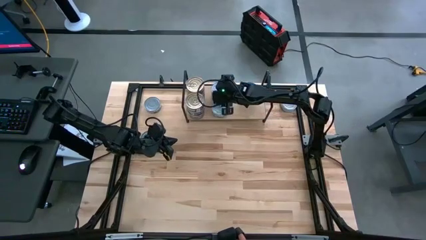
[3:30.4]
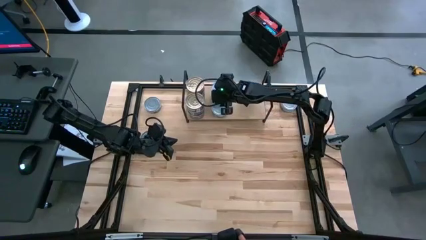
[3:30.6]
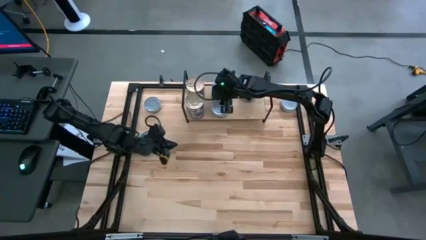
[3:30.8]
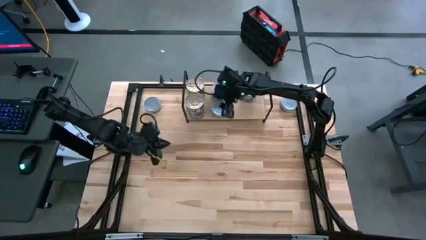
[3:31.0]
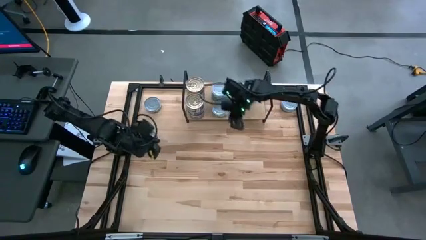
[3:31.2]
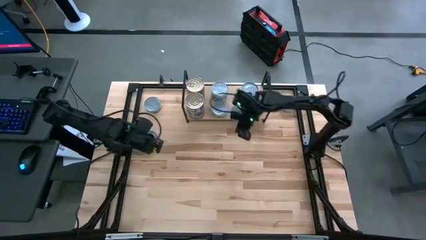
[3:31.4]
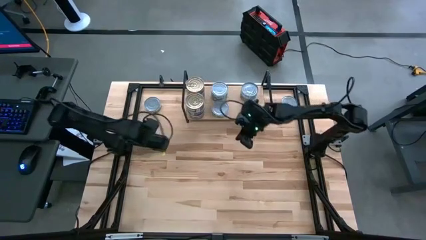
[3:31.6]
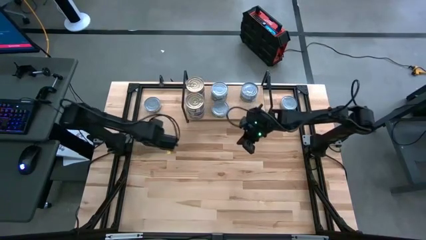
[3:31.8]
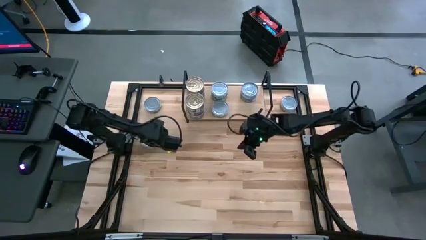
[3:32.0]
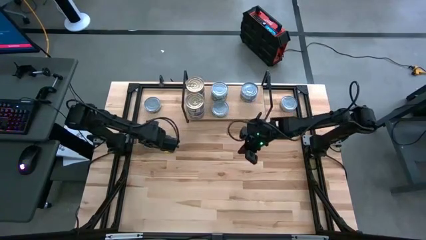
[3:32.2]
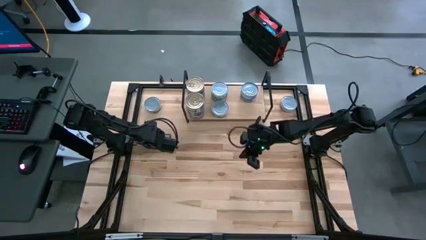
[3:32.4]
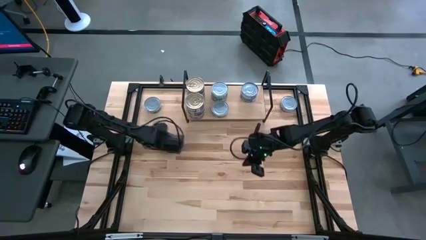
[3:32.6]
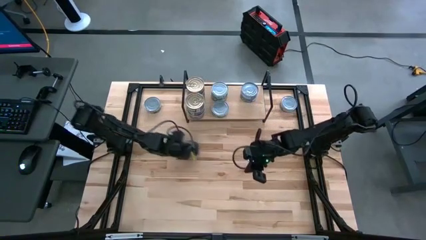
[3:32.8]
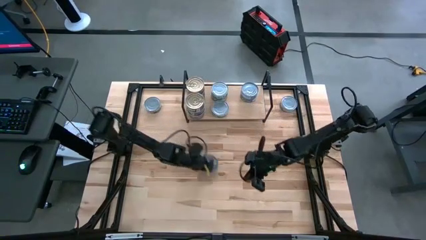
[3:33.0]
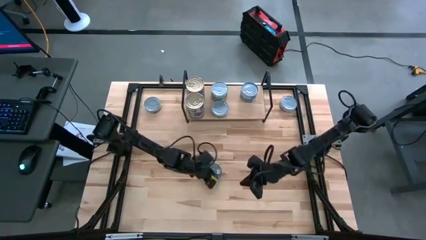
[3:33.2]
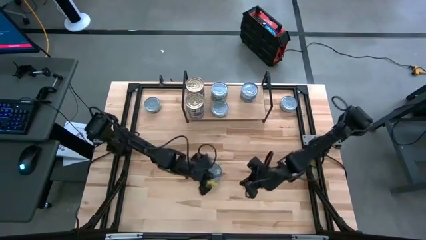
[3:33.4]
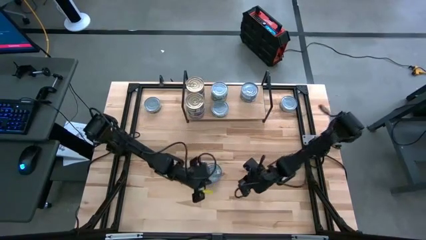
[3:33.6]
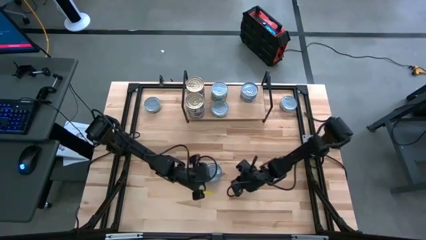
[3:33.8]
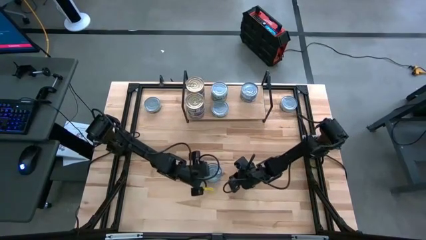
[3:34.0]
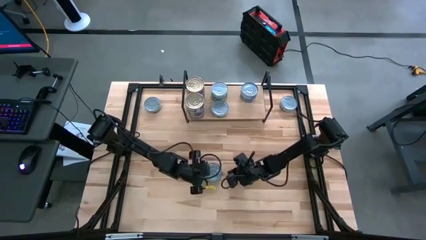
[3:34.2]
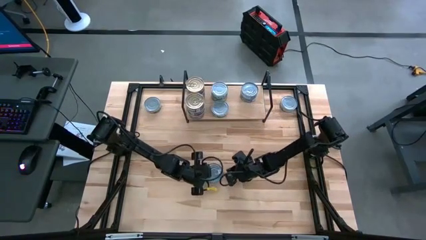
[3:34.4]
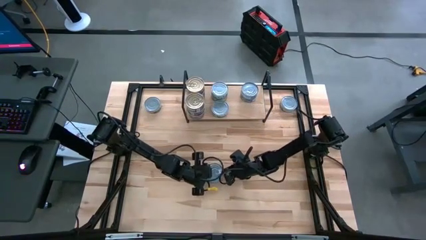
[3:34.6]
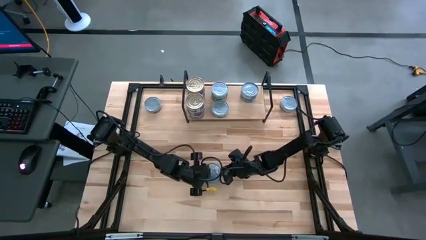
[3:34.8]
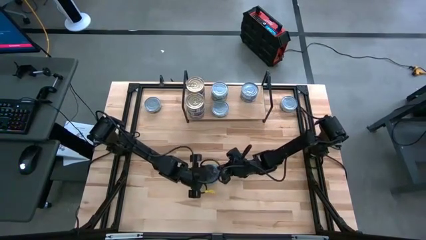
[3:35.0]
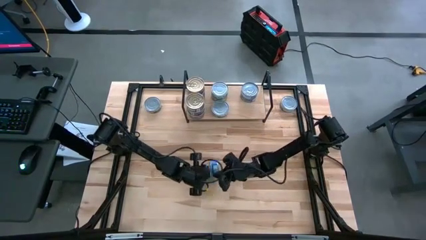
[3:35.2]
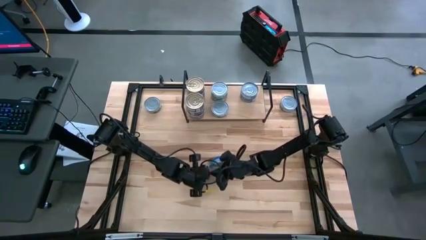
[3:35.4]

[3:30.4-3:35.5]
Task: Stack canned seafood by type on shelf
Stack the blue tuna can on top of the other blue tuna cans on the shelf

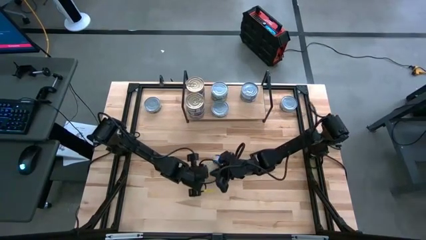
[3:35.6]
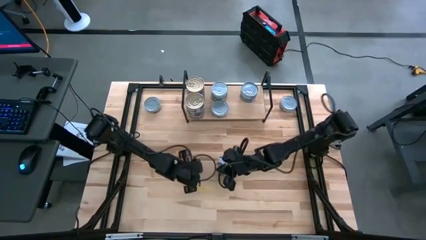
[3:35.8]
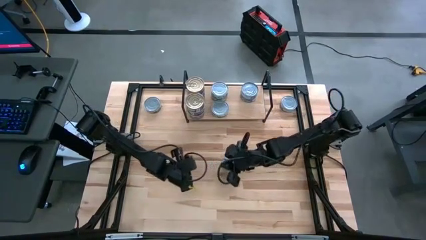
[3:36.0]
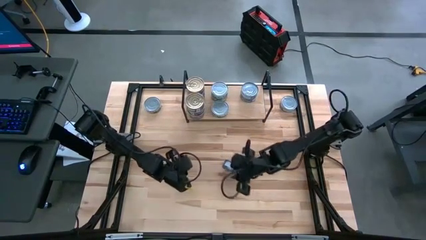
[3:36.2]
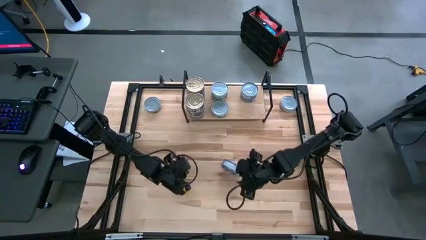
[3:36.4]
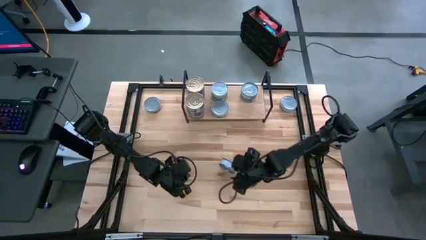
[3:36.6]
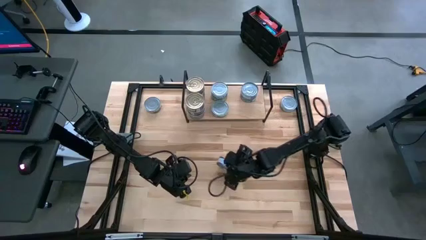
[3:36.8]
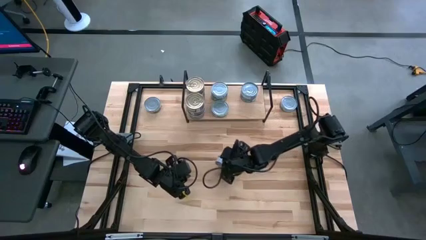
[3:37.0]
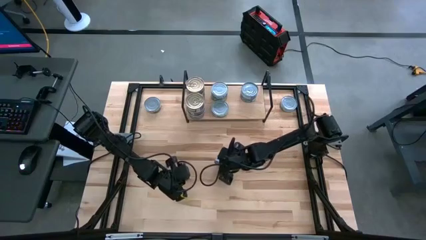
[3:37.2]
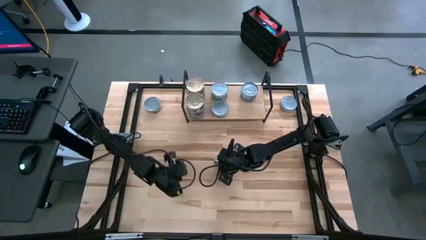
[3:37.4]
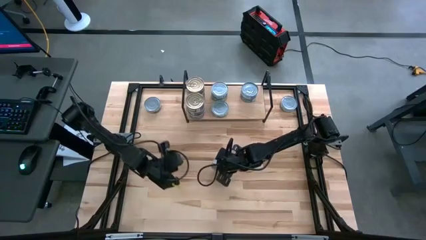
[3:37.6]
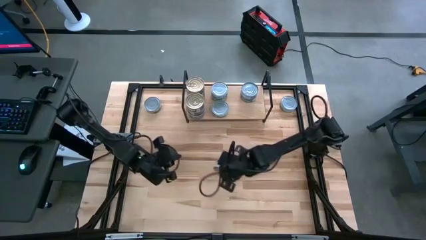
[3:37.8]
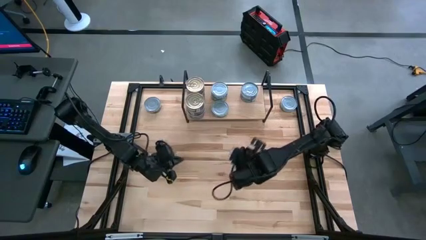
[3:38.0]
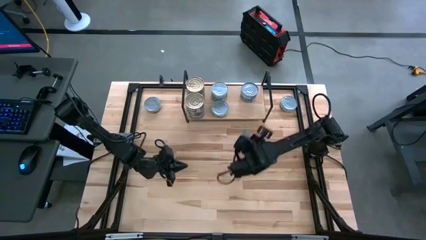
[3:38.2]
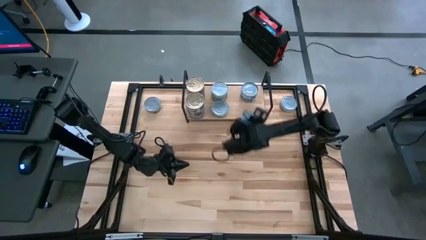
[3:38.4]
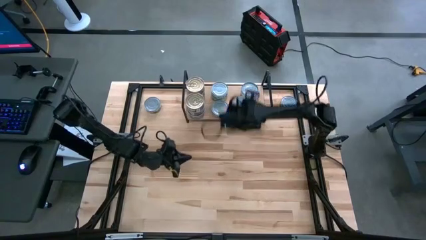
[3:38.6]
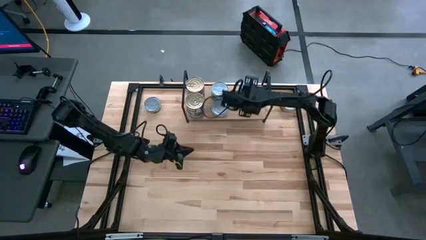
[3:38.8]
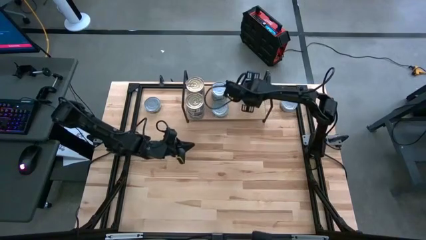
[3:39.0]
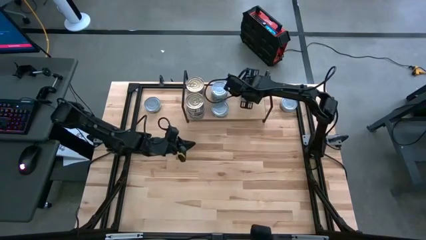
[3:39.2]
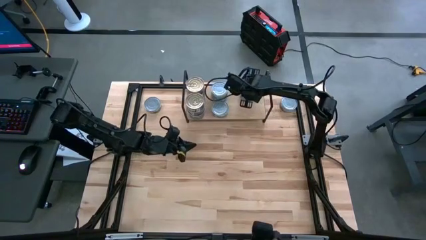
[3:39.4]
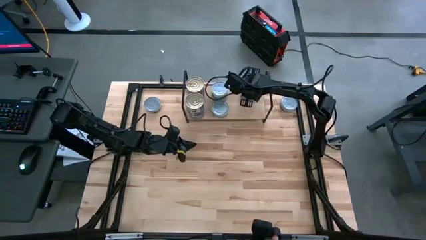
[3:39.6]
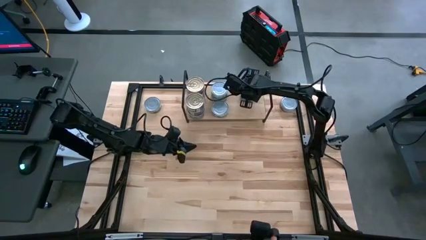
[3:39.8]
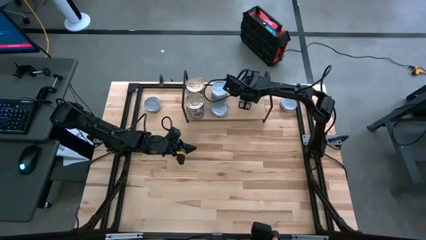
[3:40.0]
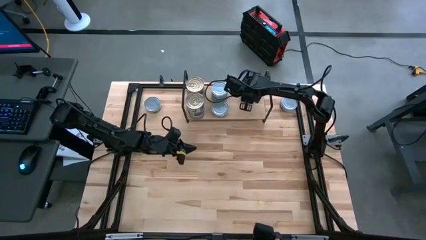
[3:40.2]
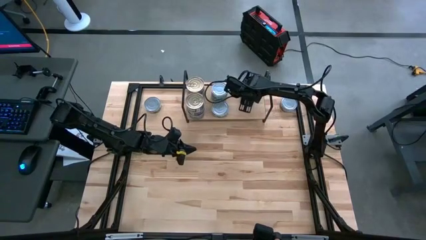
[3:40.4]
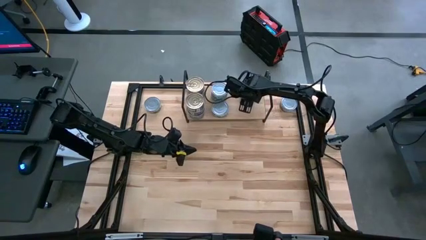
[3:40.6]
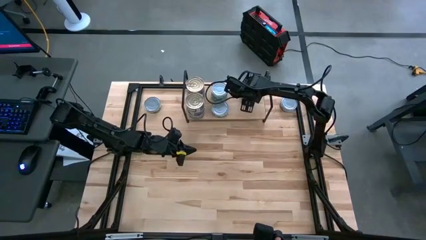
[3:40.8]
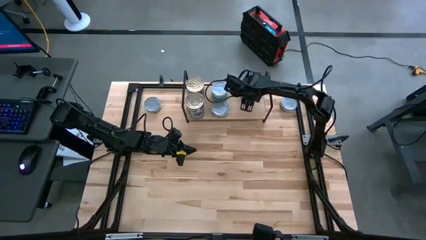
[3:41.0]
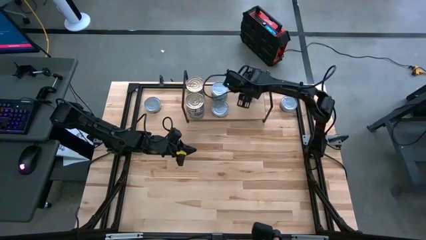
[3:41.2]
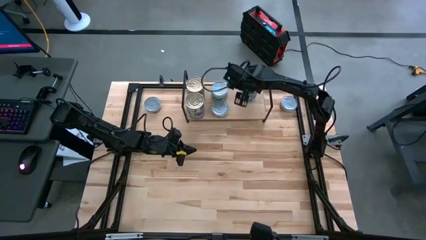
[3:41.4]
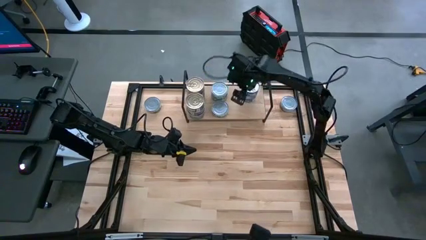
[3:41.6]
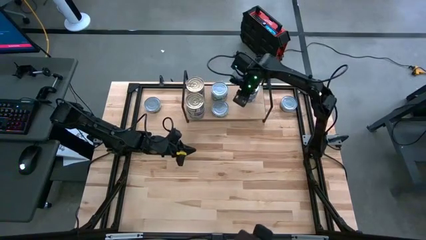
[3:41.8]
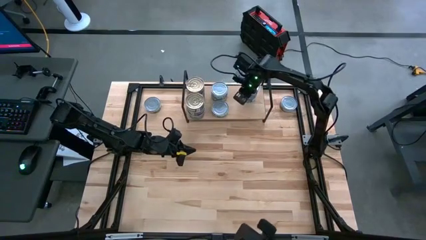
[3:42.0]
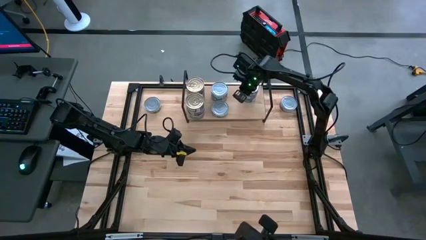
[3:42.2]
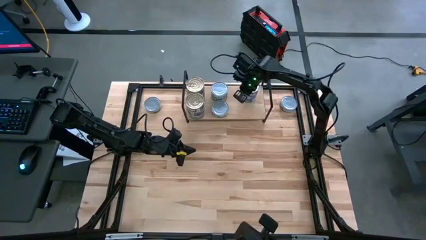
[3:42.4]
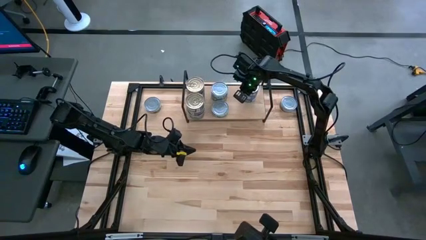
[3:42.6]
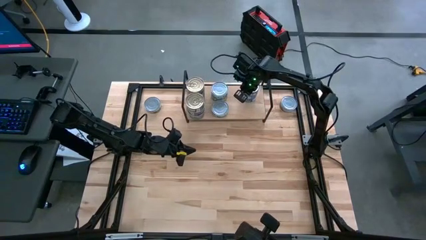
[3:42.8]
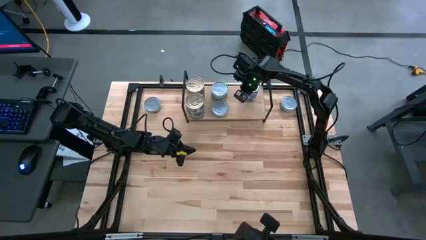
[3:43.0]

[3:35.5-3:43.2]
Stack the blue tuna can on top of the other blue tuna cans on the shelf

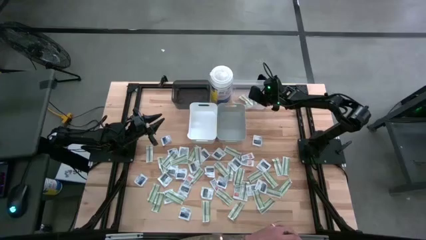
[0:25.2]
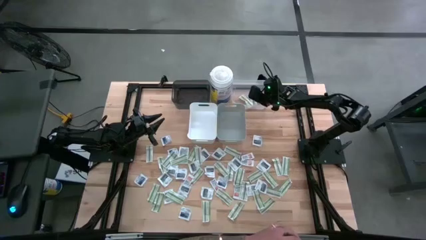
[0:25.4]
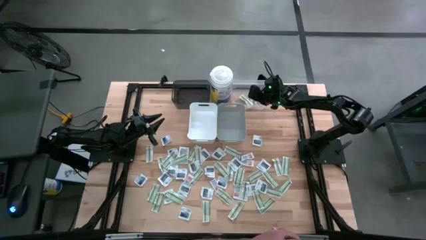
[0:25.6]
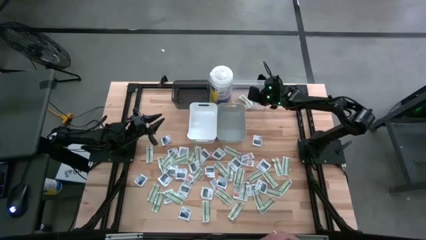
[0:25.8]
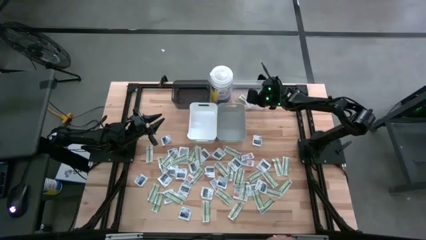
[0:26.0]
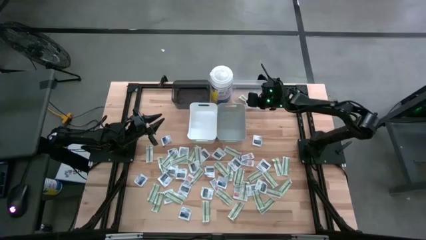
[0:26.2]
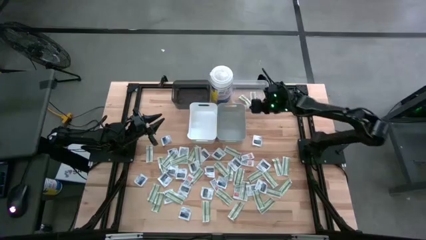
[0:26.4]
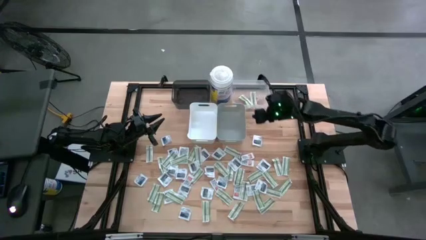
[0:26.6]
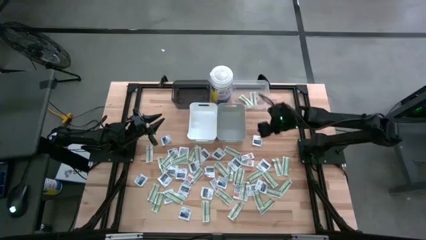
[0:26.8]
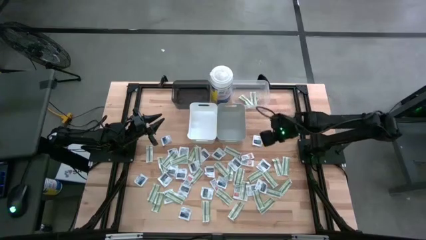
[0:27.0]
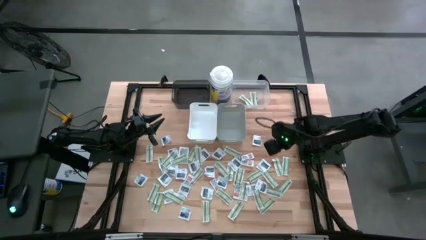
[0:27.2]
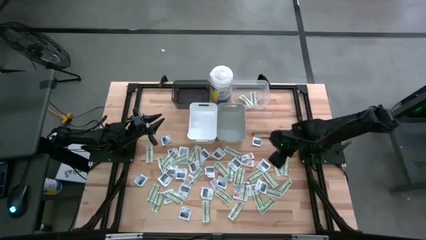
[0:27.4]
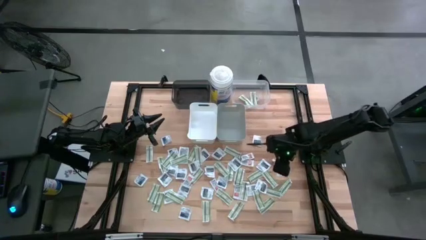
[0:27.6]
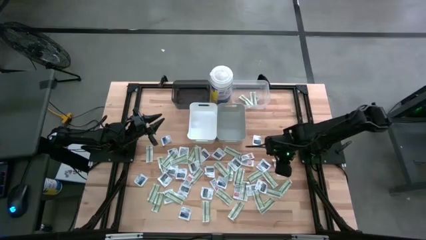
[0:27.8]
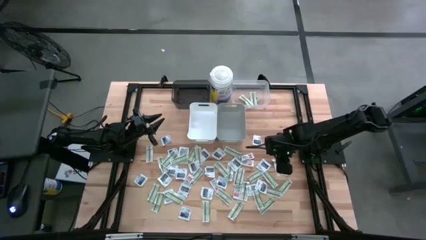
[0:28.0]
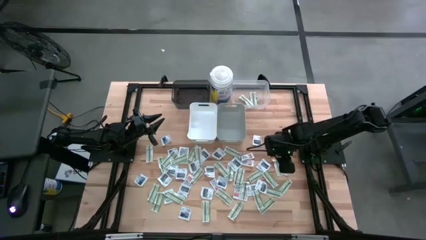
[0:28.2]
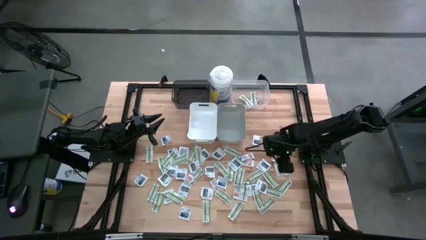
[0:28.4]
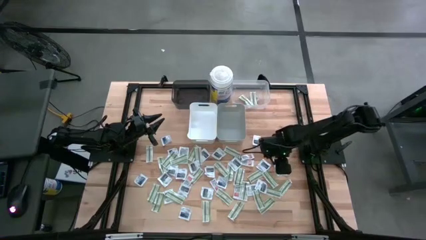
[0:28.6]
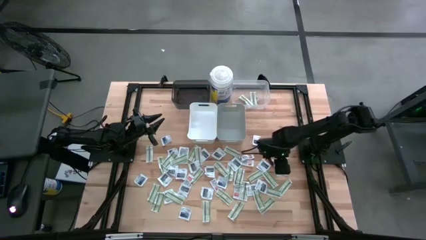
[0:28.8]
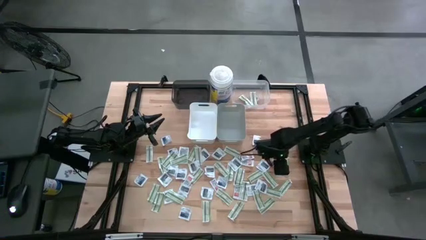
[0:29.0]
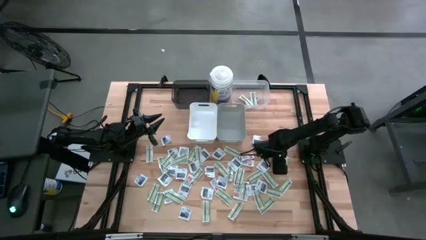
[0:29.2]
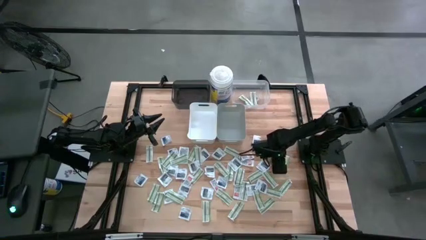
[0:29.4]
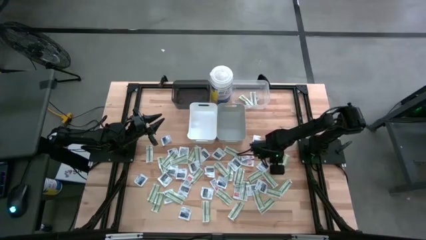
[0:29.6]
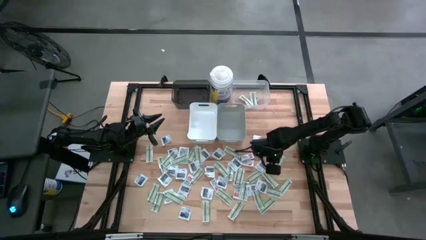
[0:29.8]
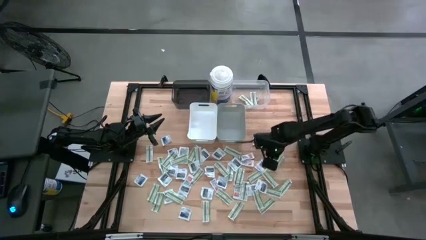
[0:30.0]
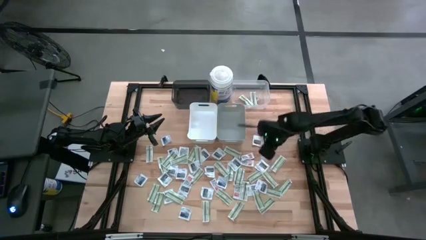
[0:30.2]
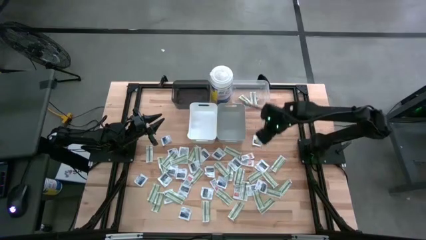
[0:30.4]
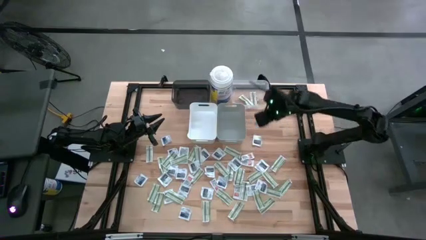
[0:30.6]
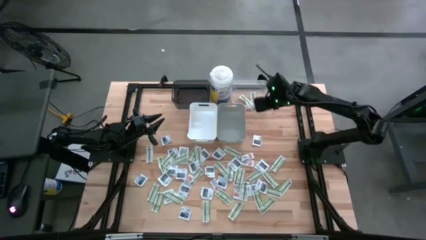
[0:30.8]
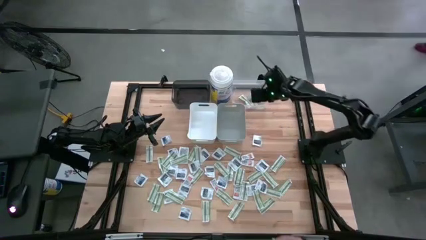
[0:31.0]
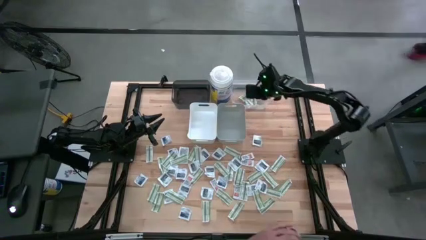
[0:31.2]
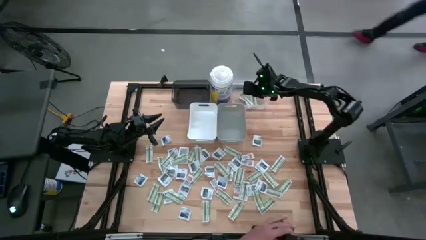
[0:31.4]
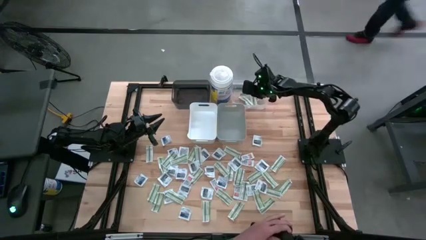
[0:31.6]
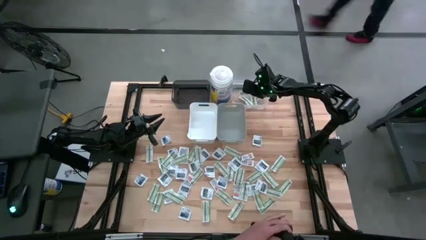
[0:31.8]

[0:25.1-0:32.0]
Task: Pick & Place First Aid Supplies
Put the band aid into the transparent bin
